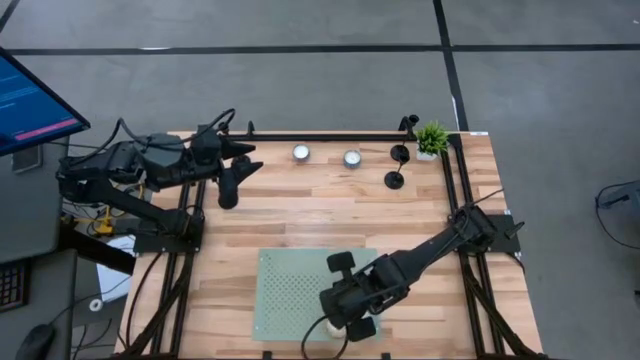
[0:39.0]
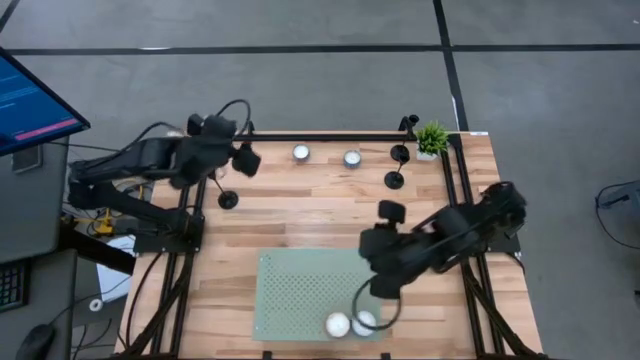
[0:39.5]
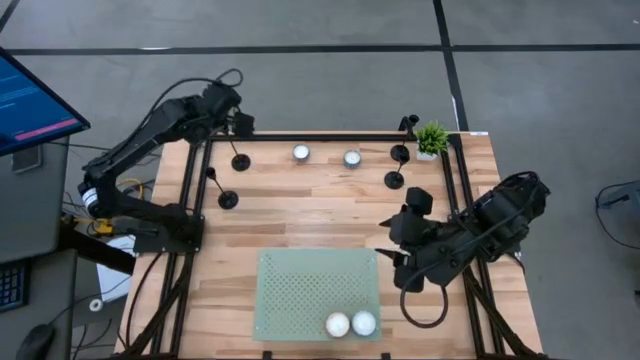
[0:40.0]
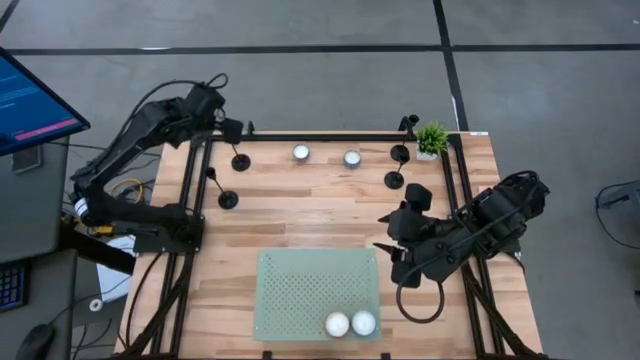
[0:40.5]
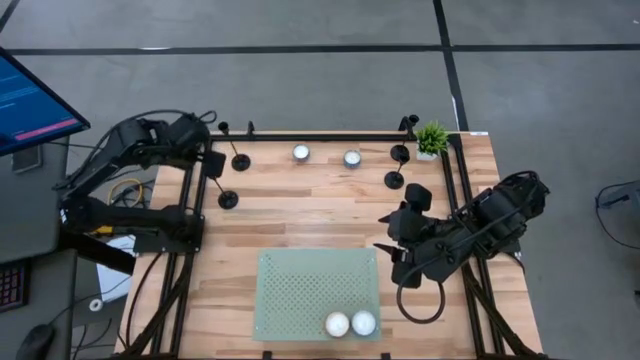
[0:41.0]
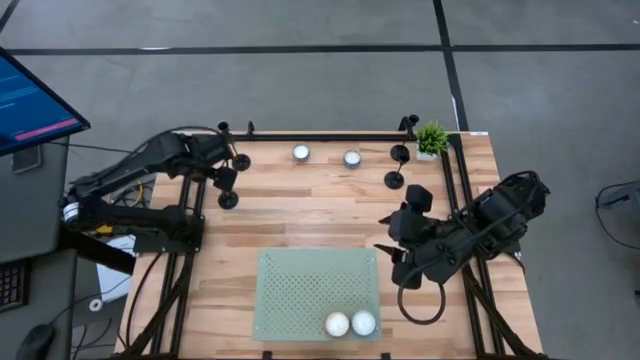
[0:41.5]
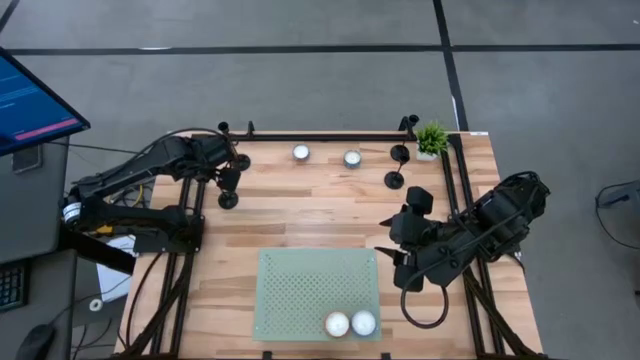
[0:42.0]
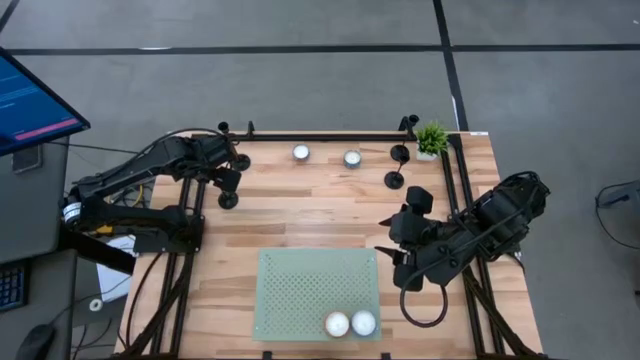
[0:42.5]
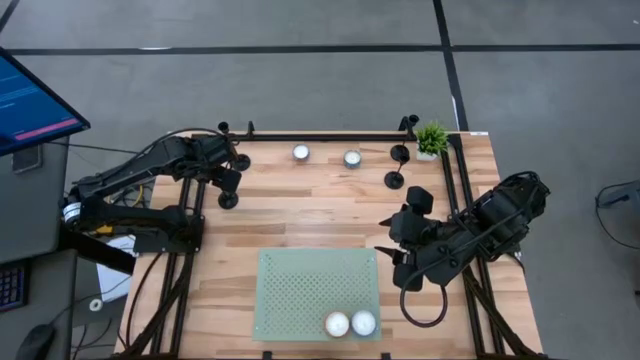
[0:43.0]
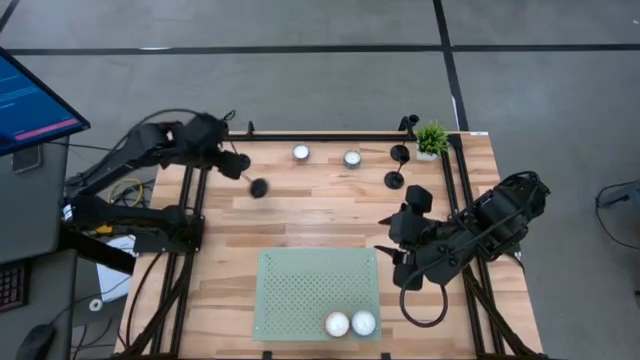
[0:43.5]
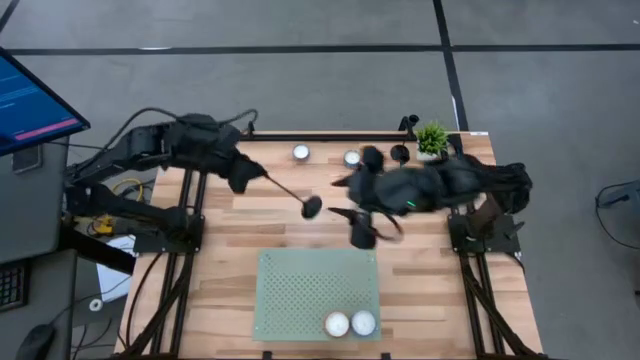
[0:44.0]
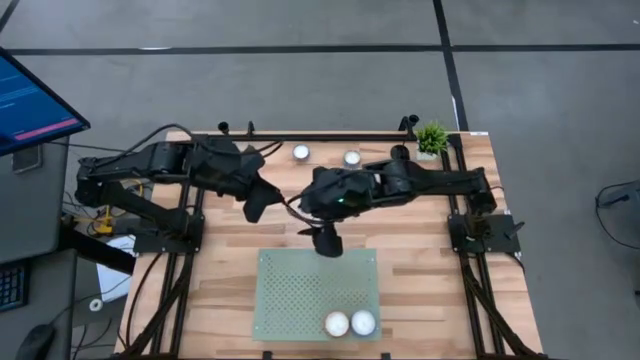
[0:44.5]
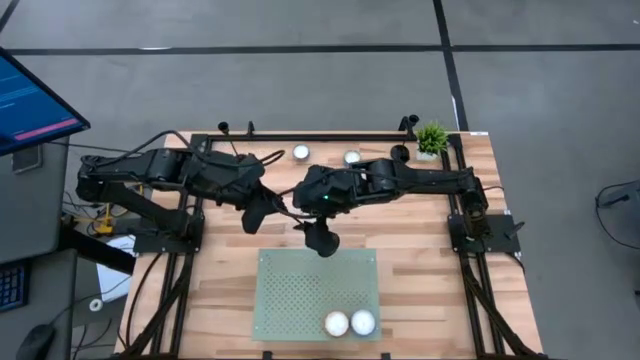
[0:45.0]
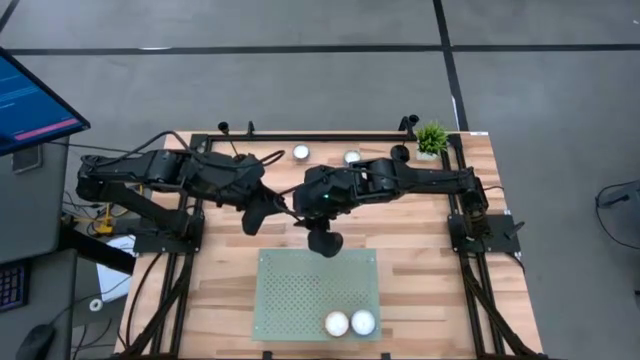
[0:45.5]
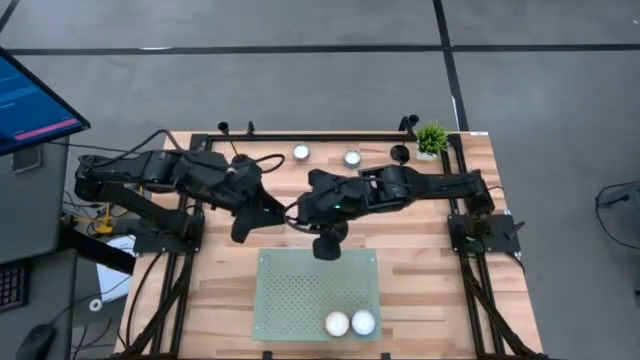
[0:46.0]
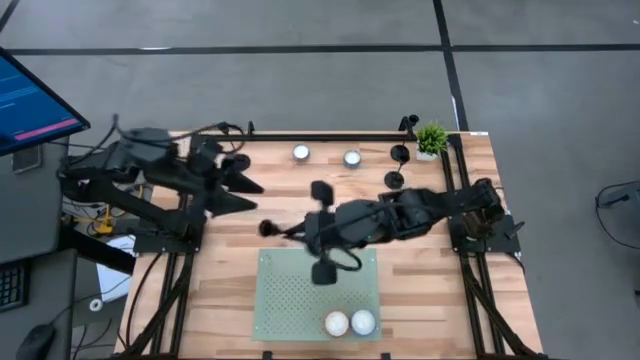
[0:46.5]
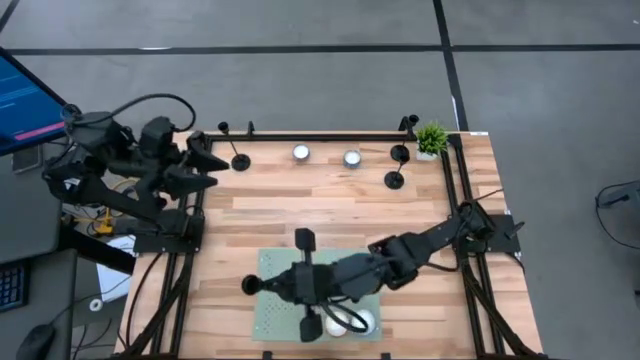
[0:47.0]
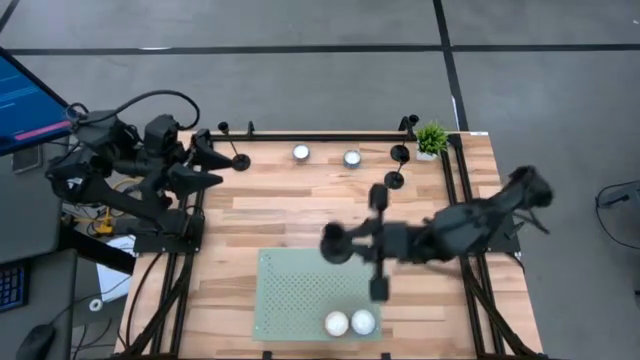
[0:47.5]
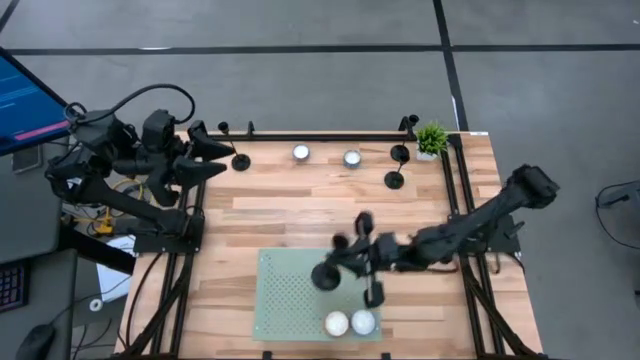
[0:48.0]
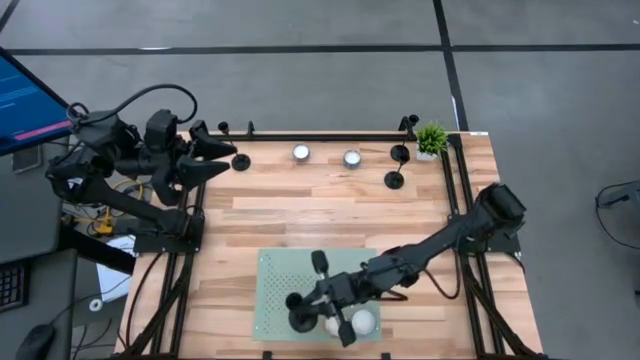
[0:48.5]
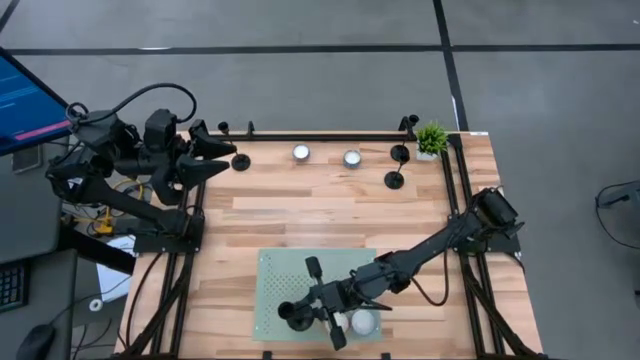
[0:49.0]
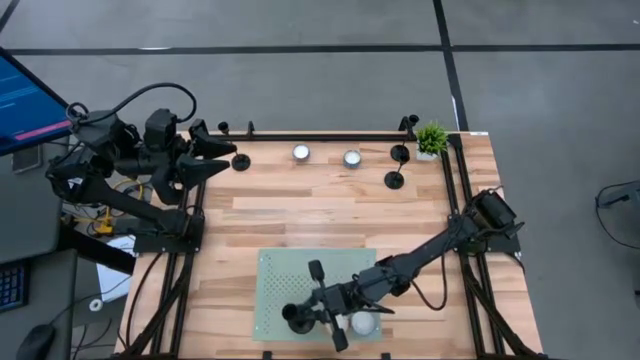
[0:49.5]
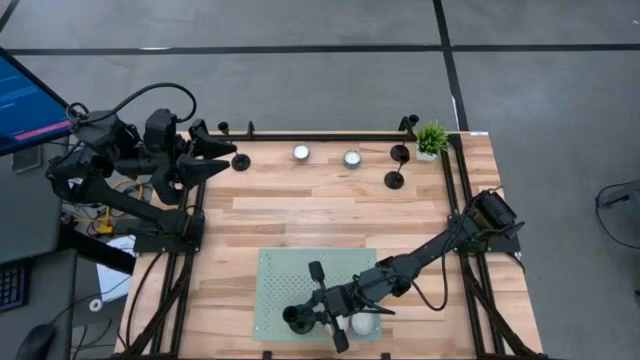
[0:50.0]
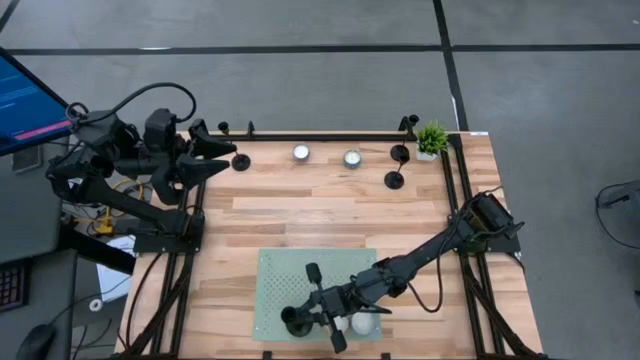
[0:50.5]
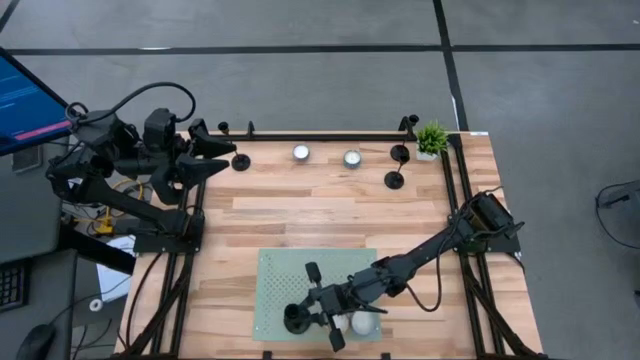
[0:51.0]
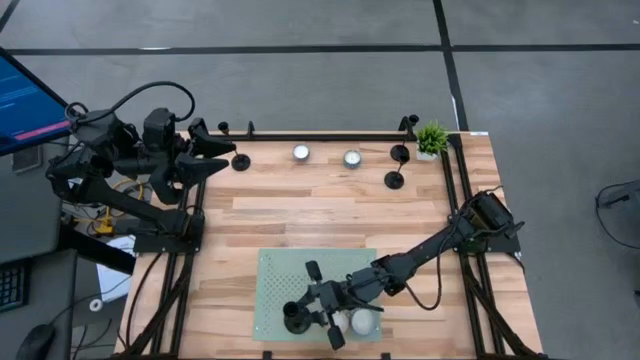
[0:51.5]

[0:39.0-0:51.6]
Task: Stock candles on shelf
Put the black candle holder on the shelf

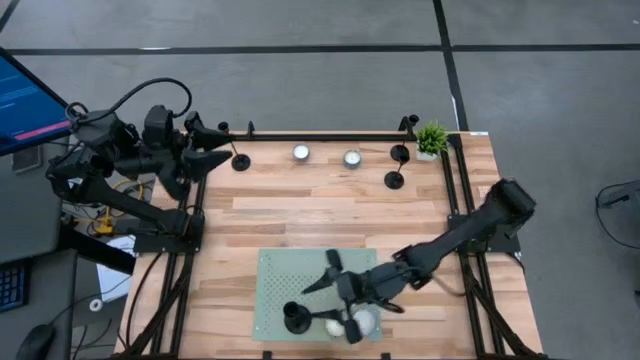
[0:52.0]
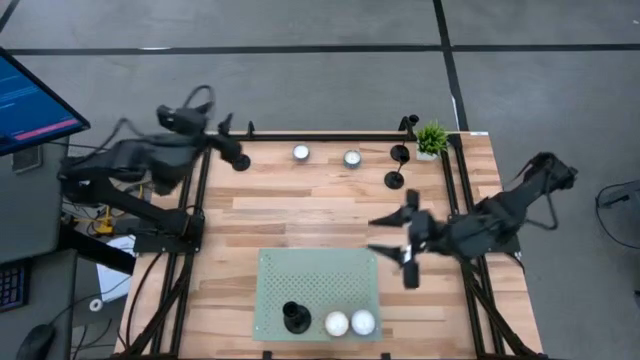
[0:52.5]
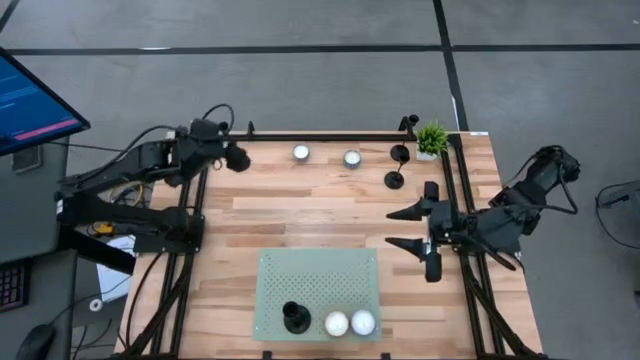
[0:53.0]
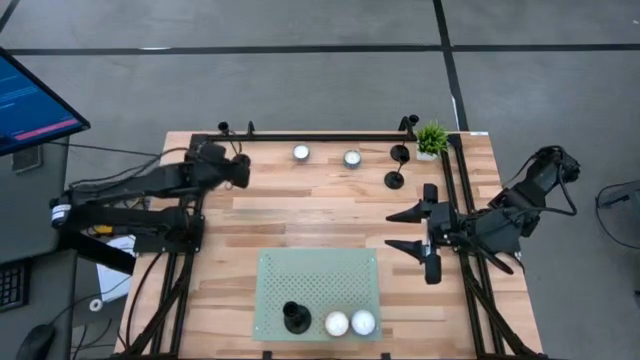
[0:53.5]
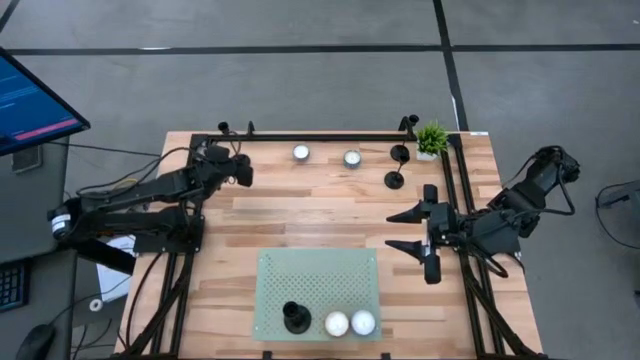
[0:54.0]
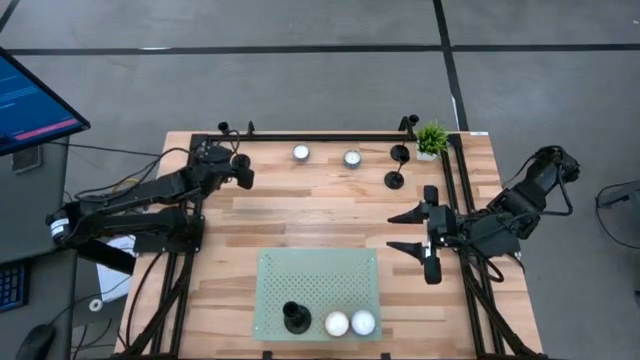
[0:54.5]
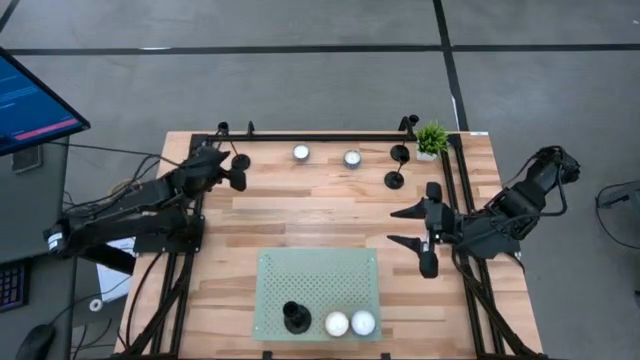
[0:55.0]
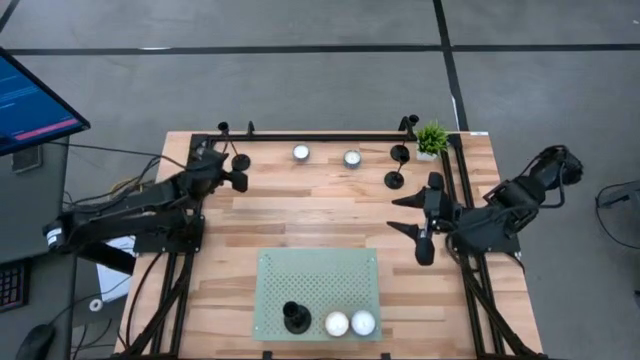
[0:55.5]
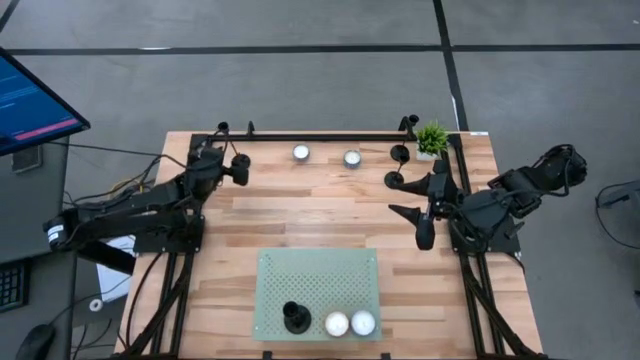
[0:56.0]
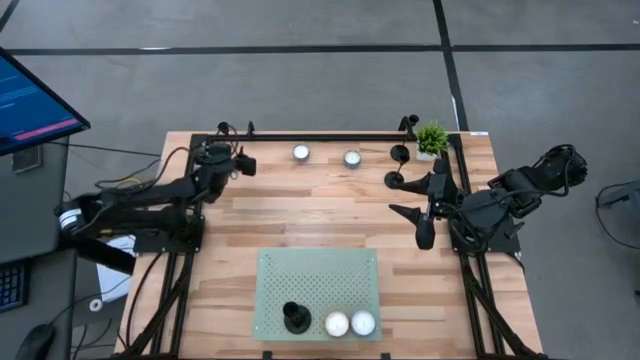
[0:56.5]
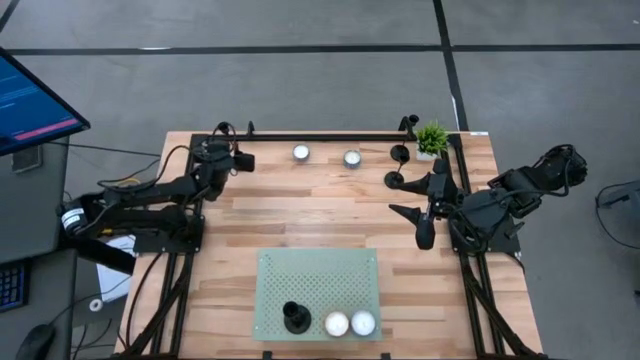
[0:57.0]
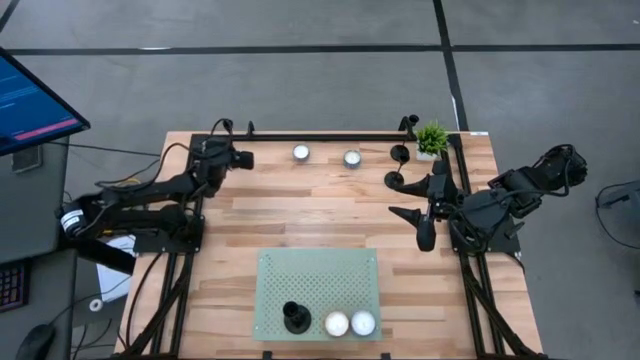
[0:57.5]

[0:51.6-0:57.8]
Put the black candle holder on the shelf

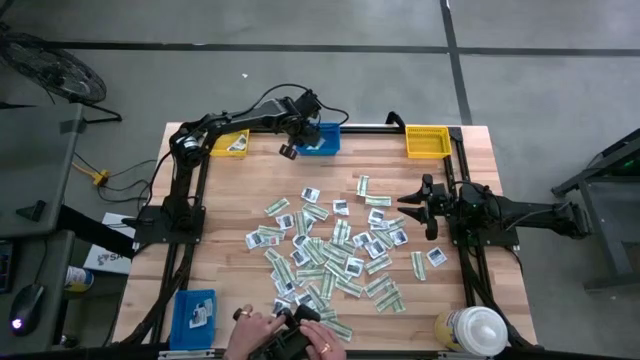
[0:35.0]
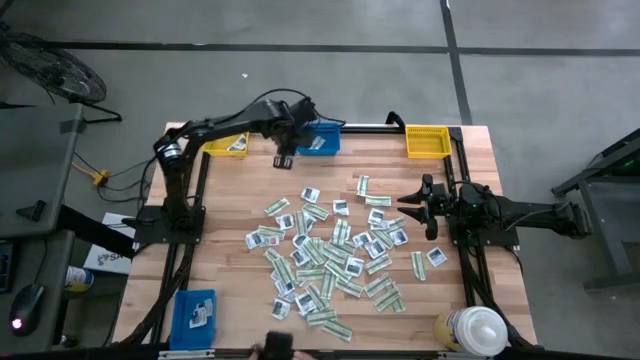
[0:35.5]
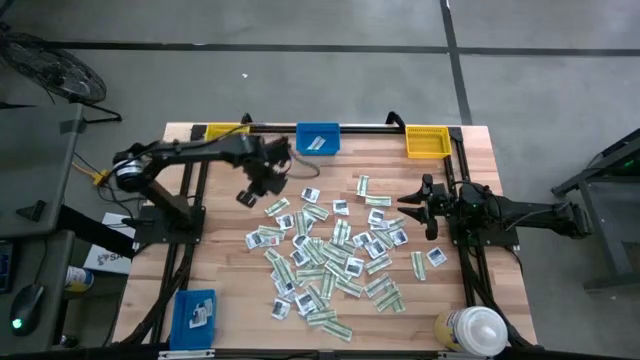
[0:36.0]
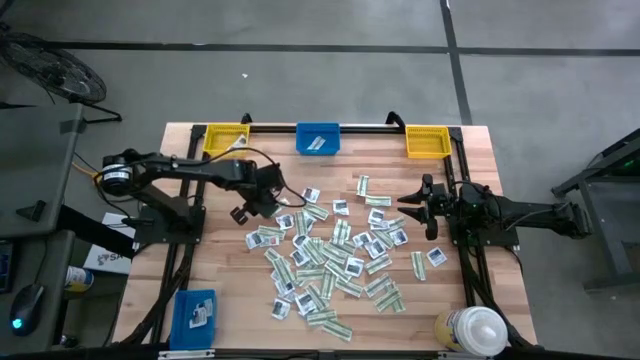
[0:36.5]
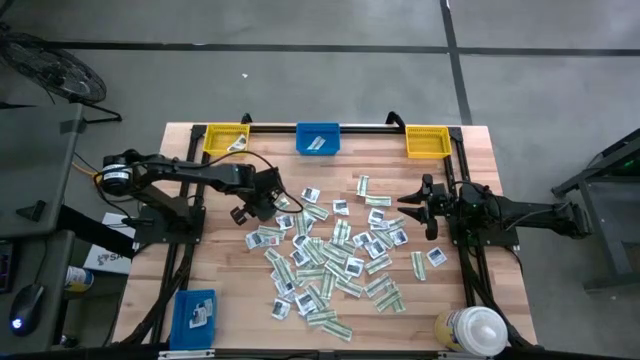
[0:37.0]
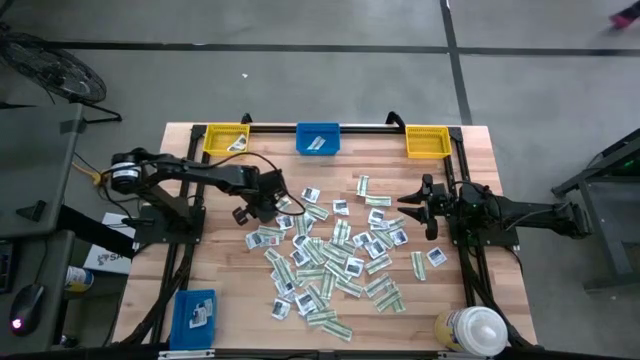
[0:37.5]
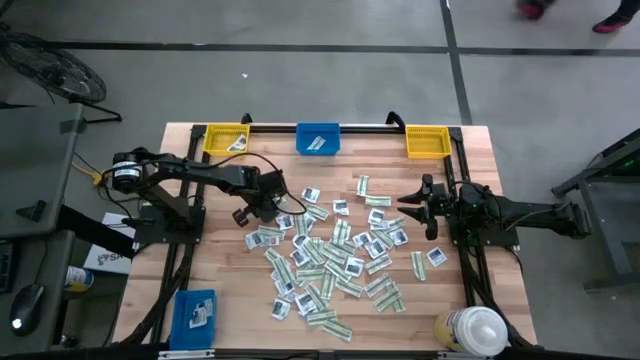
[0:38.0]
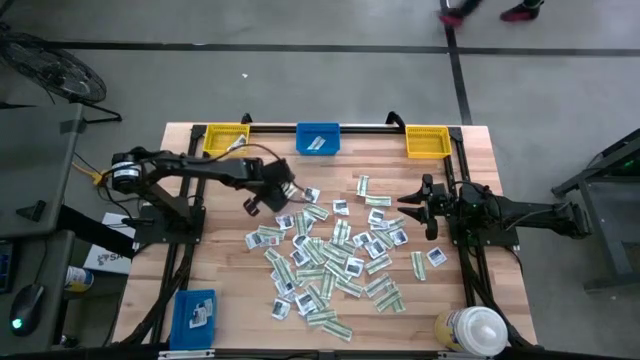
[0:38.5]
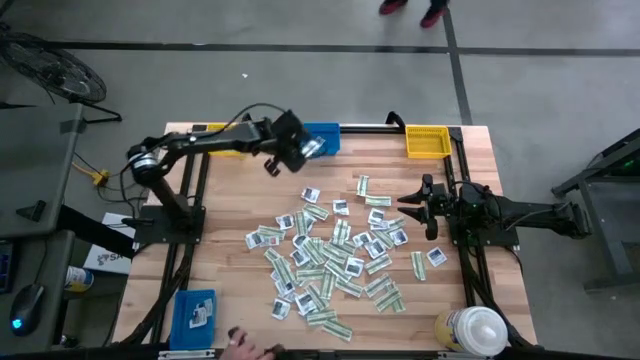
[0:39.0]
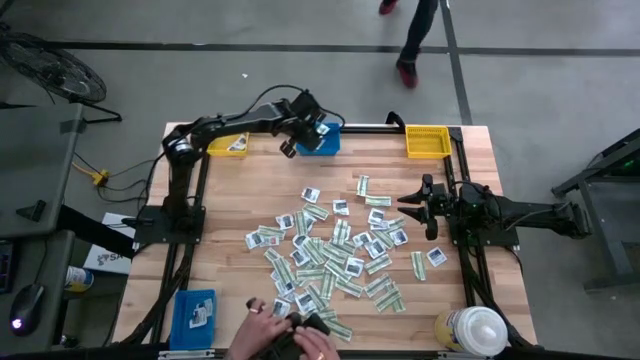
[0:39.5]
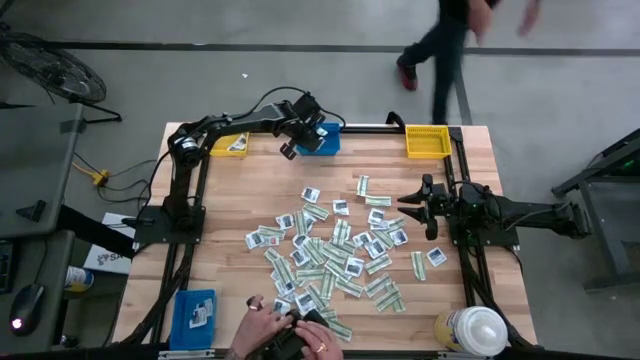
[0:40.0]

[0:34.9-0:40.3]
Task: Pick & Place First Aid Supplies
Put the green bandage pack into the top blue bin
